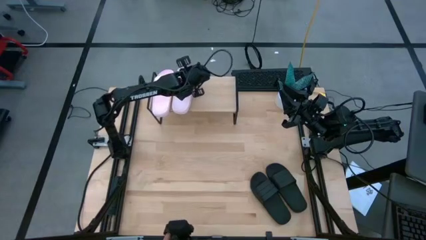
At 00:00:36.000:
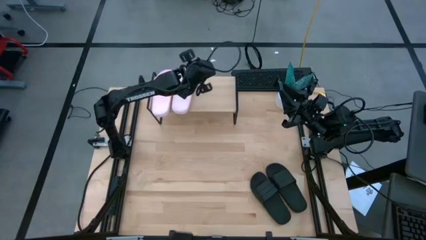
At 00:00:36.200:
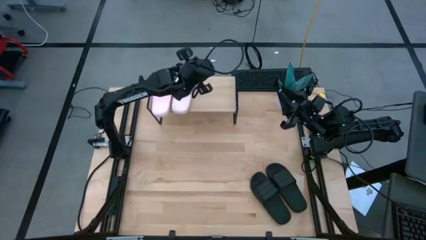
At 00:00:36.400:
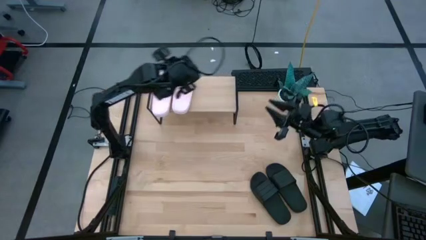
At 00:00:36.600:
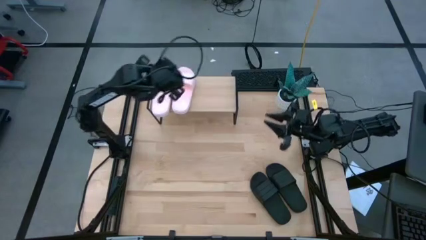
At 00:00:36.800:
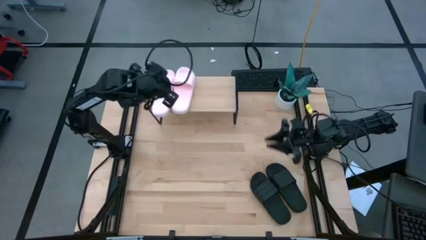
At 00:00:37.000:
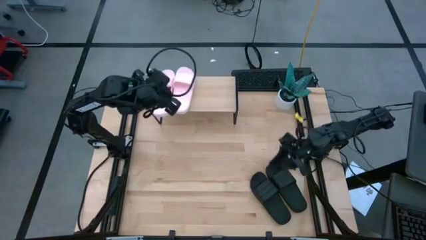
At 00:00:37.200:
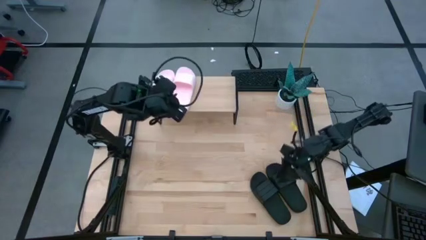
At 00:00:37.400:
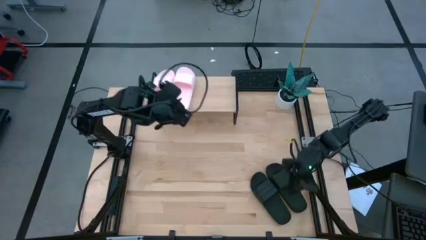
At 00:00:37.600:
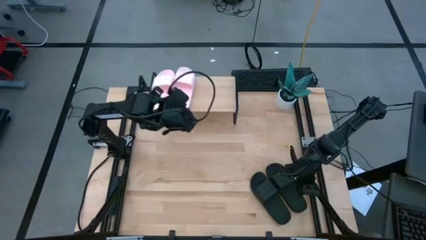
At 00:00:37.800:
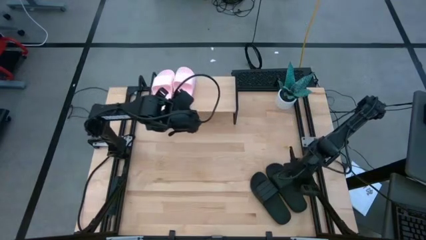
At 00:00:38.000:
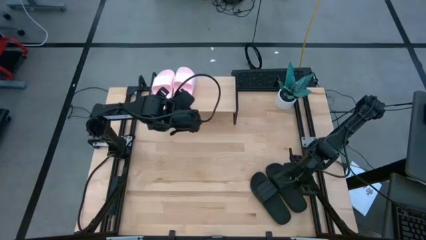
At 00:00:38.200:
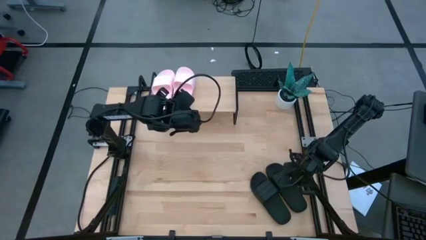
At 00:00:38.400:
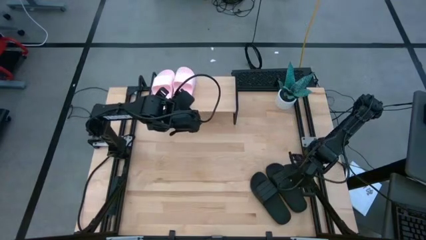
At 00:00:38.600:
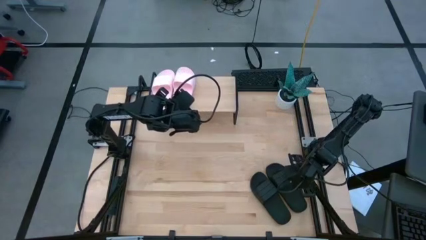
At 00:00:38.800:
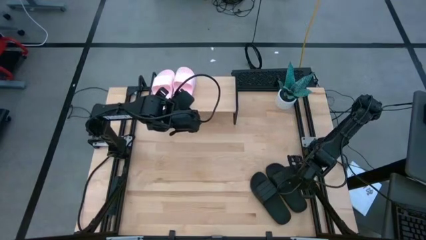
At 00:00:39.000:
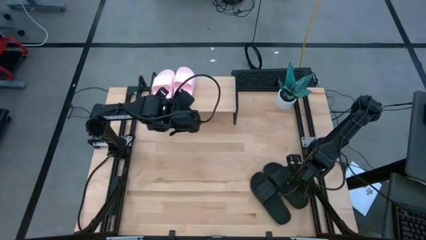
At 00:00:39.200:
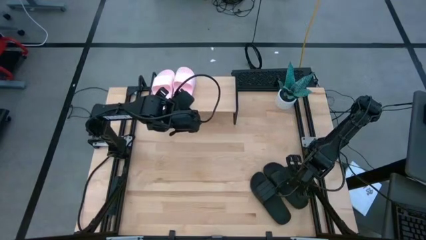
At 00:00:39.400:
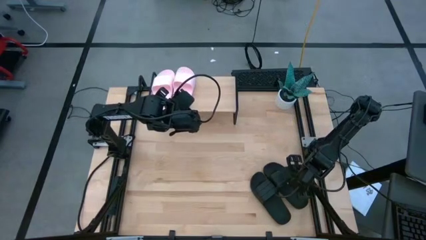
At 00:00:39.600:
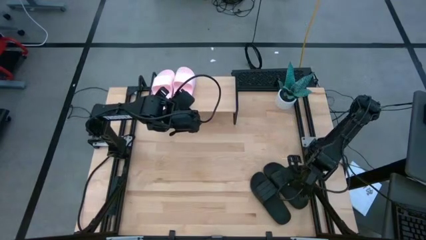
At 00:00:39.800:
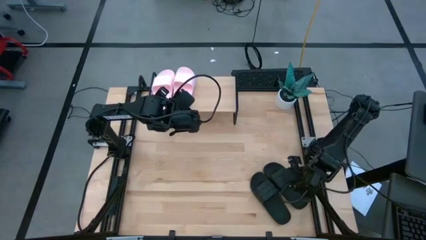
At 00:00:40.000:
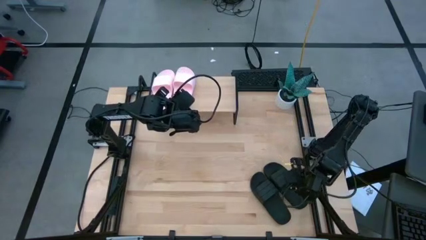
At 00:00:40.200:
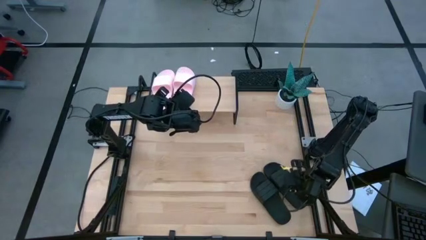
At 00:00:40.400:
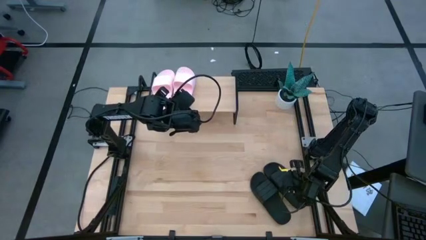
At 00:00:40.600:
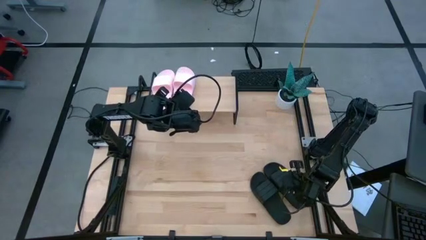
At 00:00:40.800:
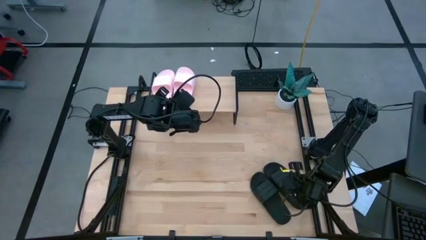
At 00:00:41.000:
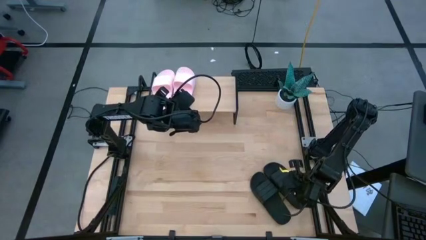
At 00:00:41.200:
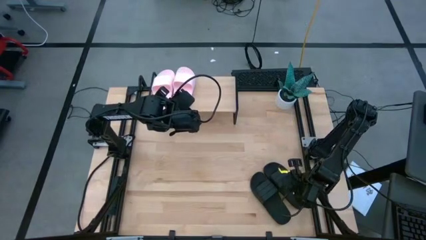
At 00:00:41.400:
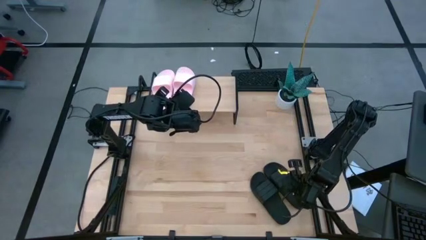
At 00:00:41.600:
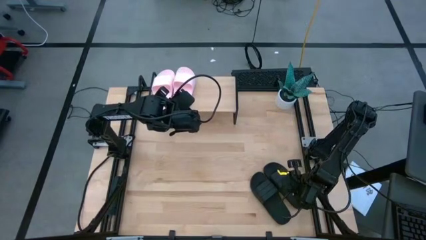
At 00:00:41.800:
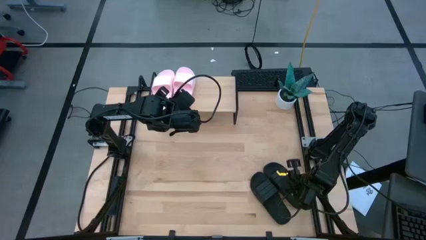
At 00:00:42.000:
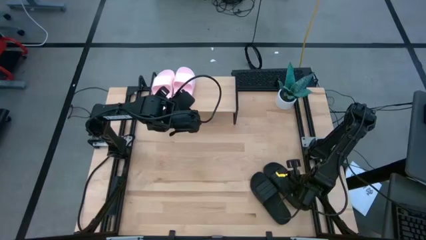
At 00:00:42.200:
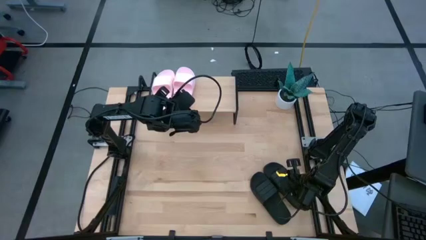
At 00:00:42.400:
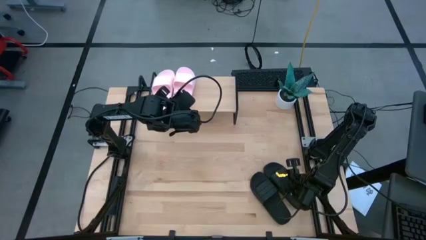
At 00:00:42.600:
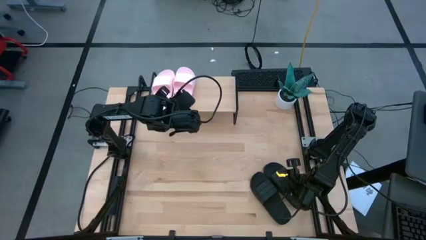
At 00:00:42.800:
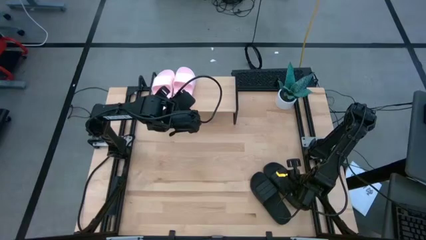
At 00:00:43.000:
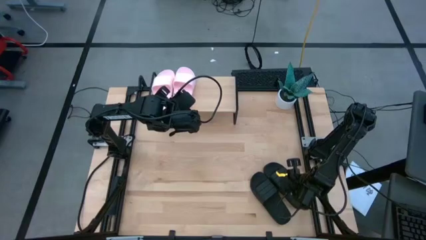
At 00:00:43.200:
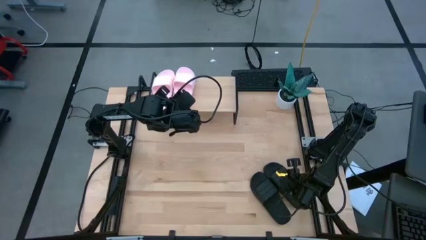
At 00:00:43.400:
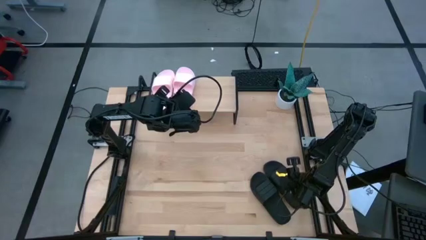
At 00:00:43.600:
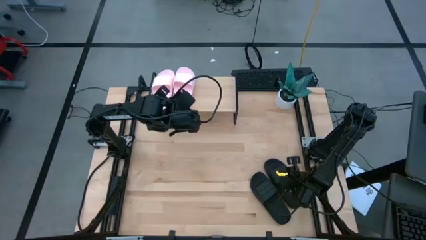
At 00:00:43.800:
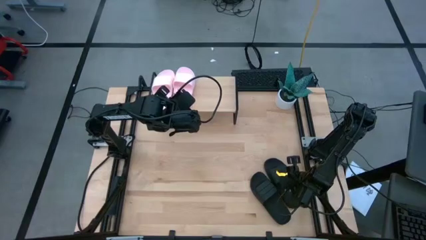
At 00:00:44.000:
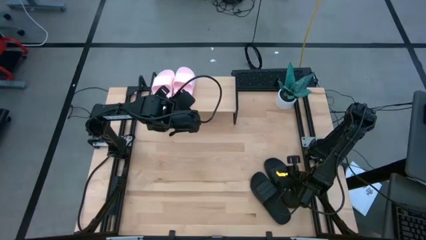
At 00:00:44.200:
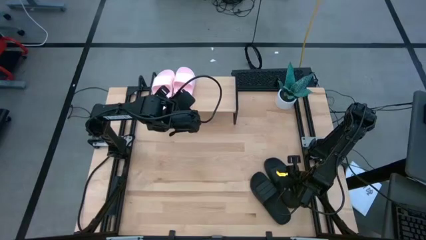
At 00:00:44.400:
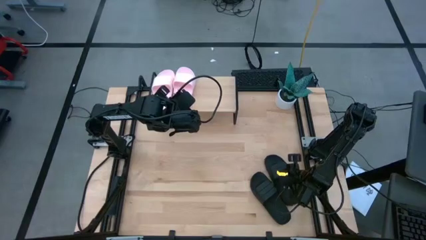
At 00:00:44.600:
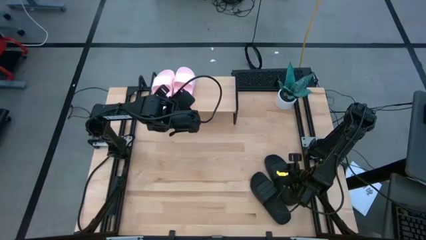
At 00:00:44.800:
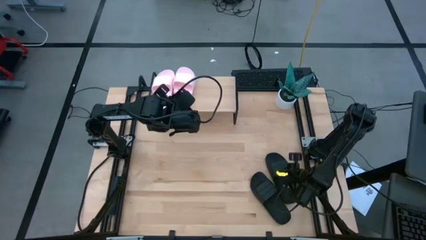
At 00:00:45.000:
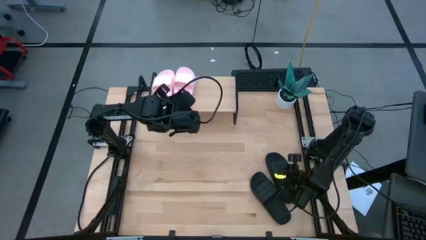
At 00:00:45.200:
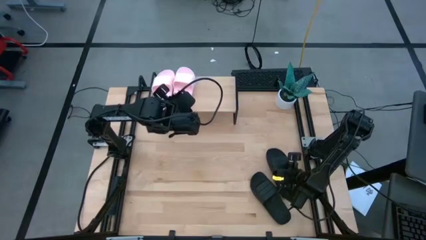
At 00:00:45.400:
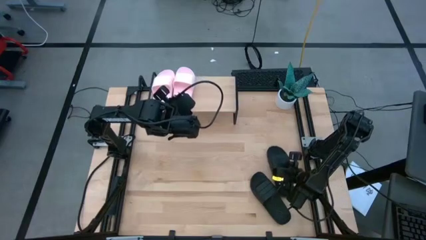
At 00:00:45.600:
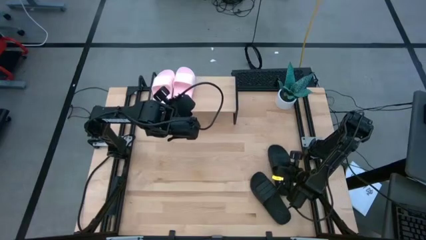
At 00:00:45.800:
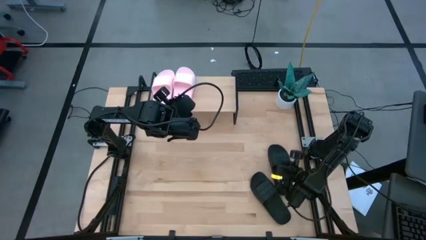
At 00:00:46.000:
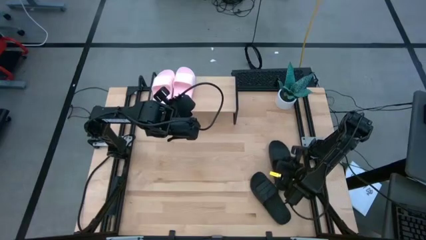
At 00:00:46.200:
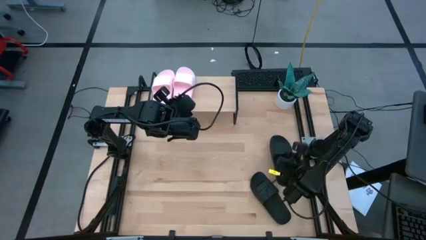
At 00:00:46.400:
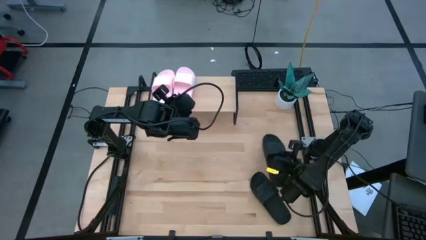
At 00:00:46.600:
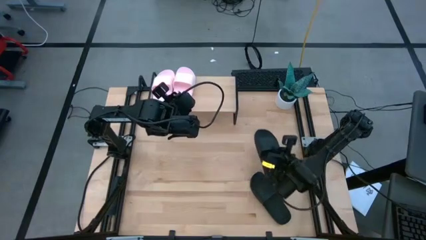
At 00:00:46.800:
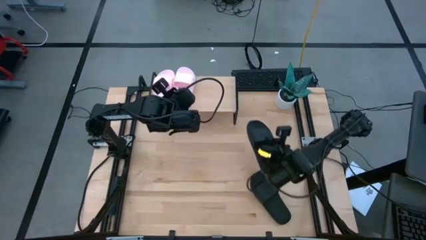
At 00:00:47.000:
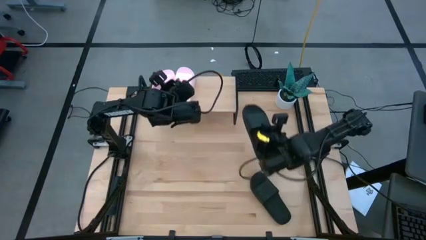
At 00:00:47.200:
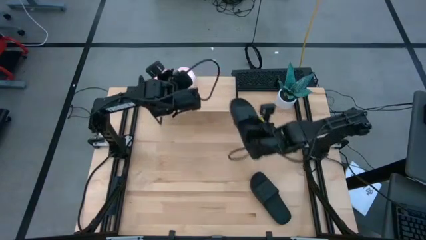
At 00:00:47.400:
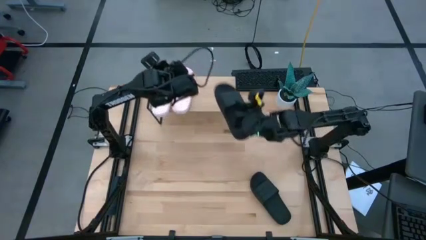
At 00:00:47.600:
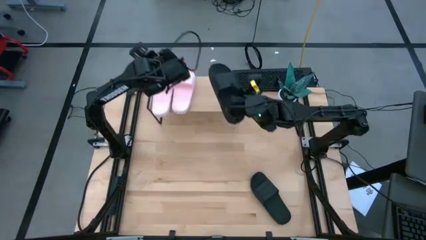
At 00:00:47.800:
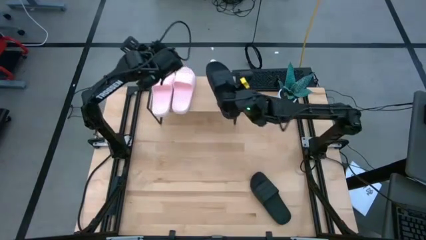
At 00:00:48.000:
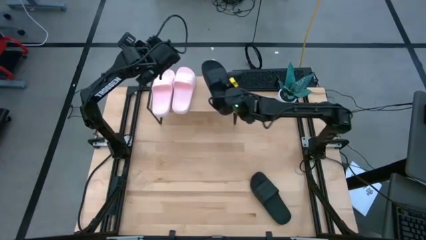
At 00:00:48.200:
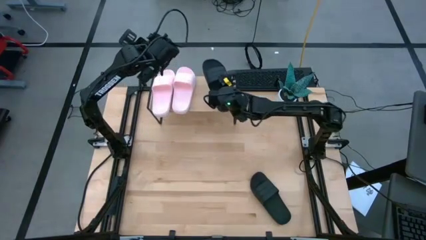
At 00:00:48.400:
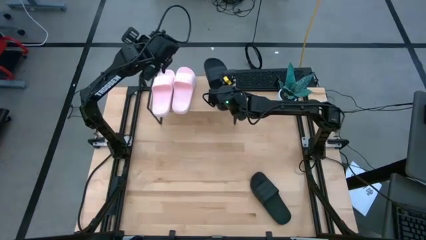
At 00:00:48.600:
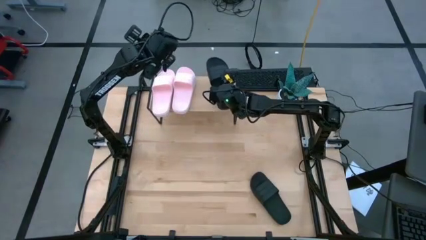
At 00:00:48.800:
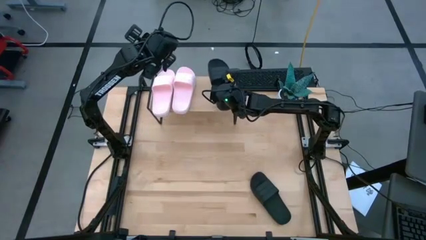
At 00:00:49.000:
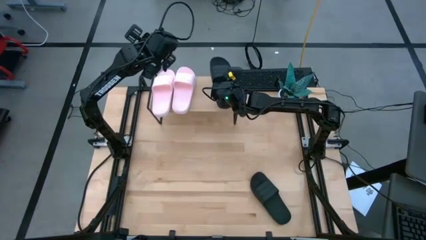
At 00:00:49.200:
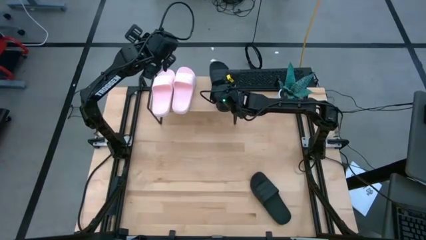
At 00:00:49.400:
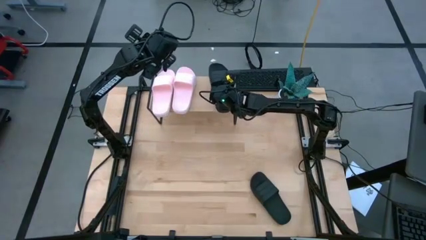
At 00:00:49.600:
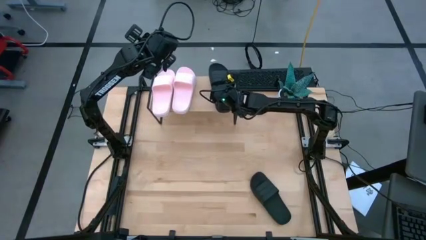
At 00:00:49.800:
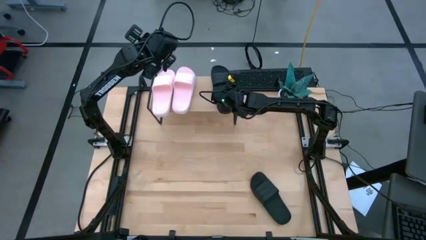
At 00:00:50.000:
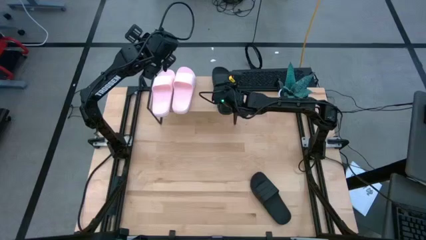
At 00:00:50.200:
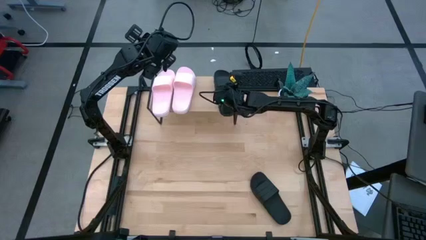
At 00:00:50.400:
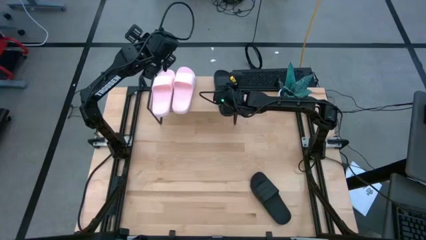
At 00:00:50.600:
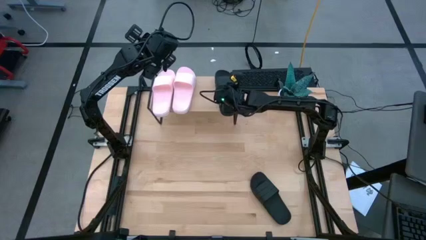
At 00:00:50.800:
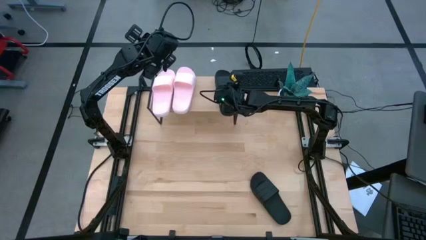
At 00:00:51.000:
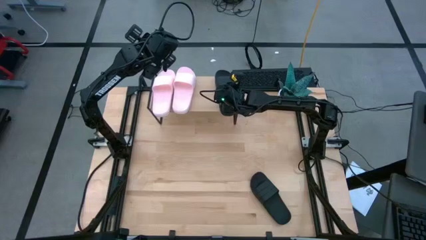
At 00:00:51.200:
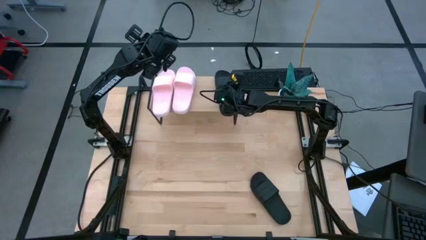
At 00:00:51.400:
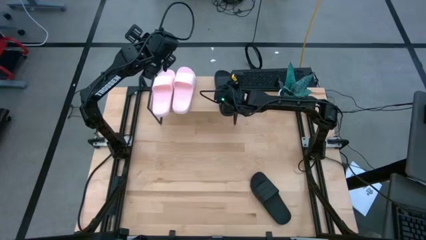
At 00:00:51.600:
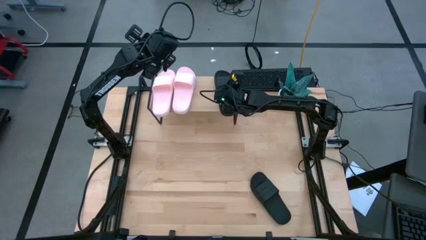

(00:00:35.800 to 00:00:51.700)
Task: Pick and place slides into the shelf
Put the right black slipper on the shelf
